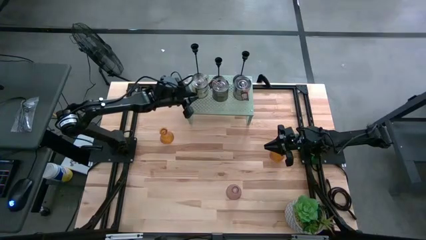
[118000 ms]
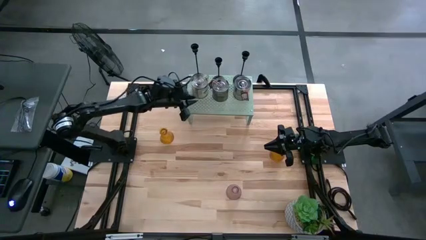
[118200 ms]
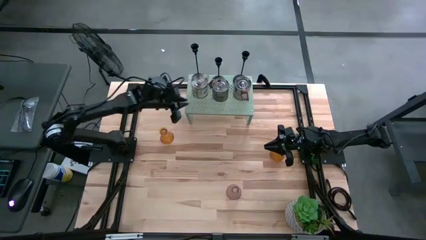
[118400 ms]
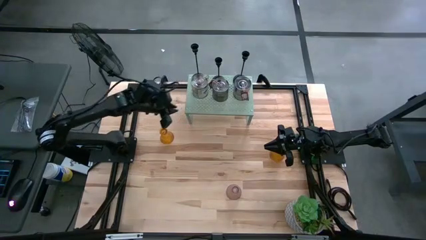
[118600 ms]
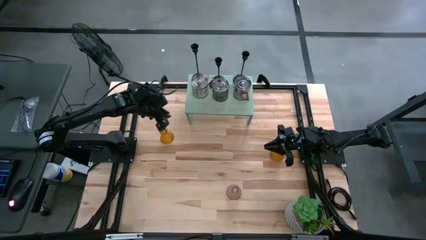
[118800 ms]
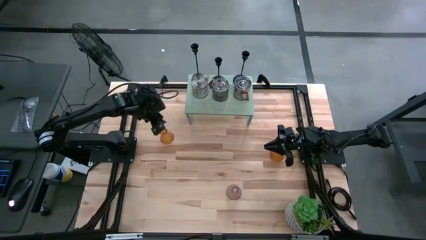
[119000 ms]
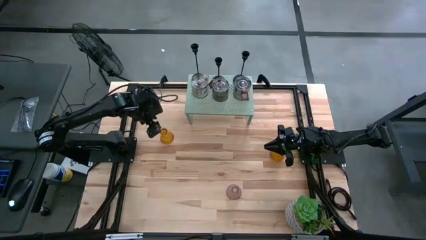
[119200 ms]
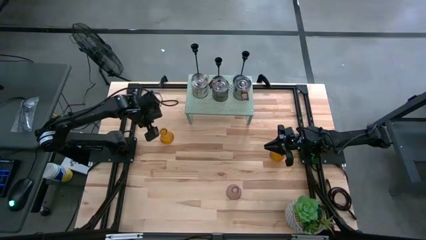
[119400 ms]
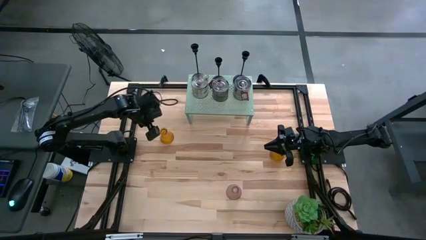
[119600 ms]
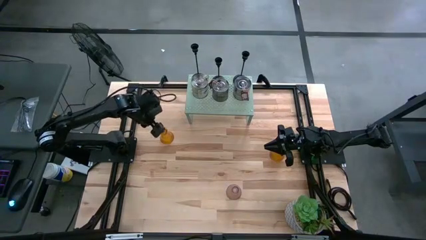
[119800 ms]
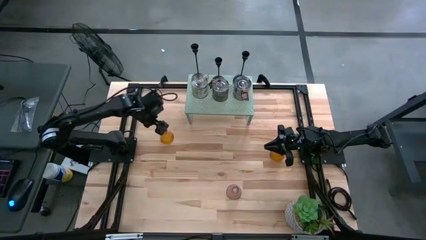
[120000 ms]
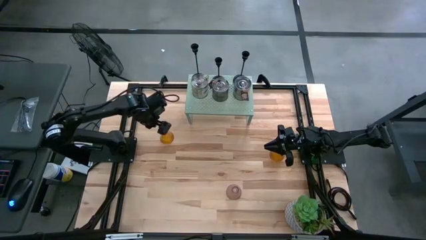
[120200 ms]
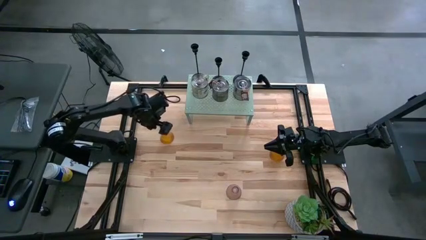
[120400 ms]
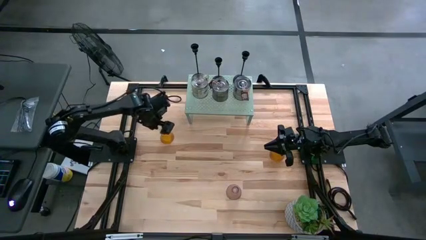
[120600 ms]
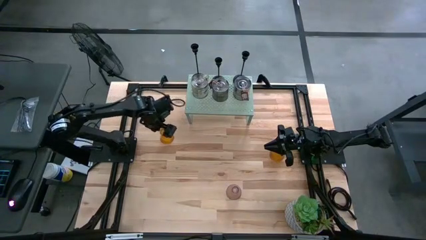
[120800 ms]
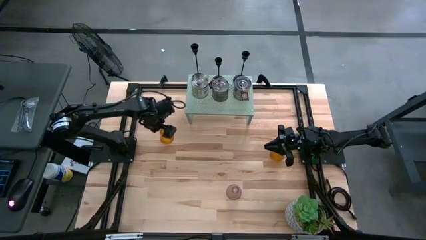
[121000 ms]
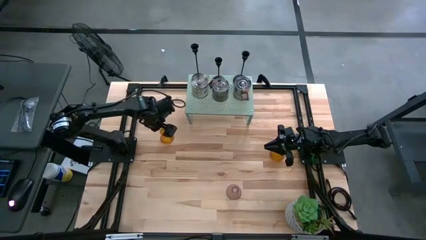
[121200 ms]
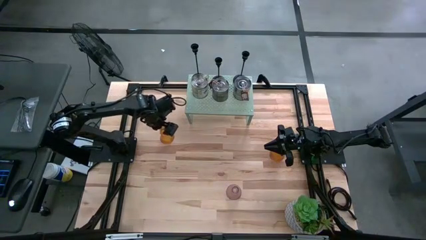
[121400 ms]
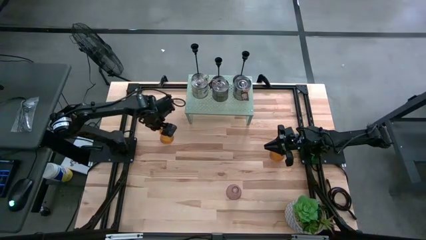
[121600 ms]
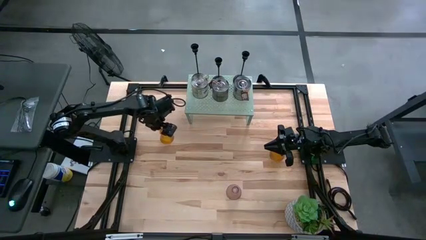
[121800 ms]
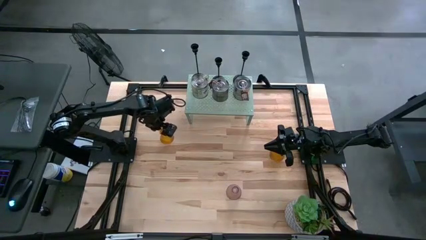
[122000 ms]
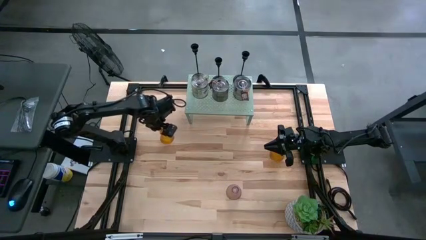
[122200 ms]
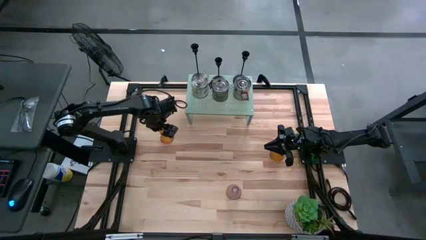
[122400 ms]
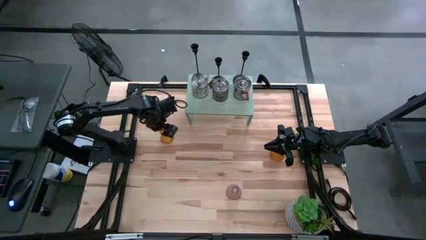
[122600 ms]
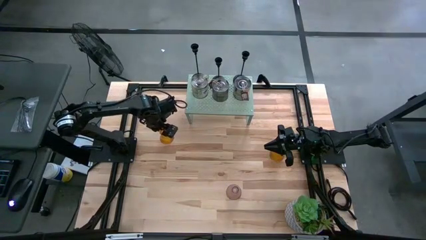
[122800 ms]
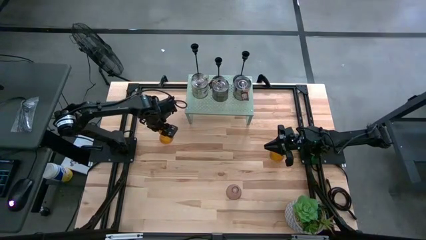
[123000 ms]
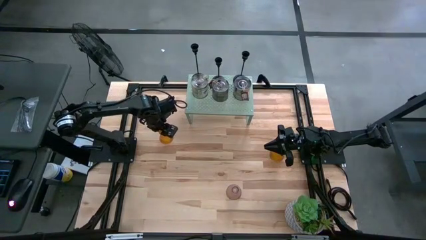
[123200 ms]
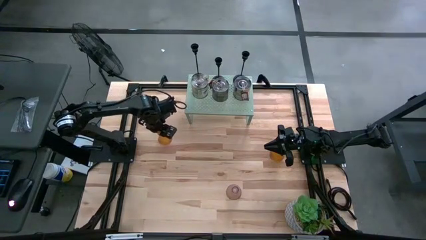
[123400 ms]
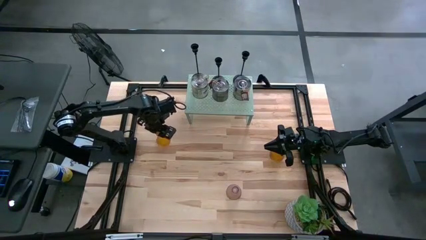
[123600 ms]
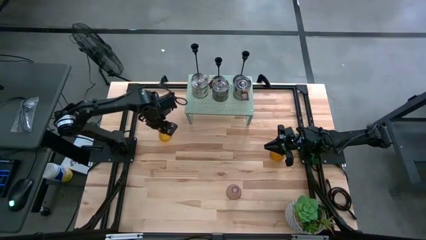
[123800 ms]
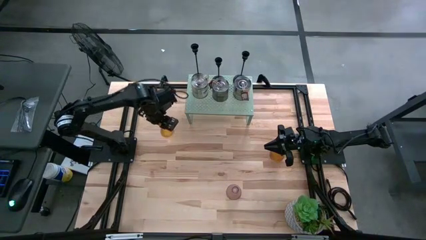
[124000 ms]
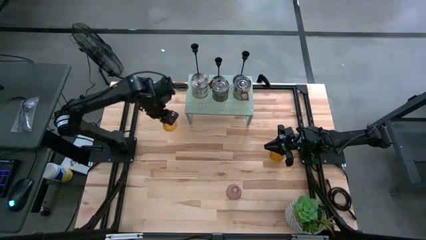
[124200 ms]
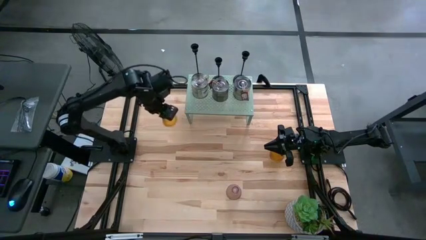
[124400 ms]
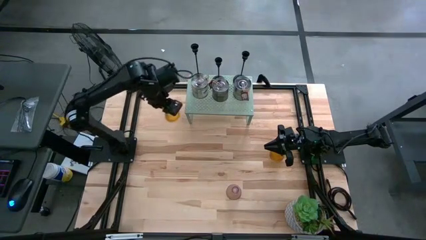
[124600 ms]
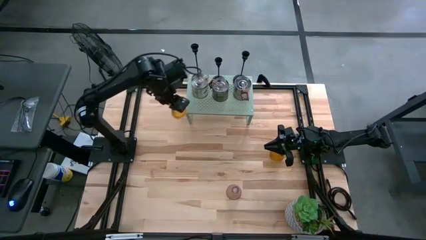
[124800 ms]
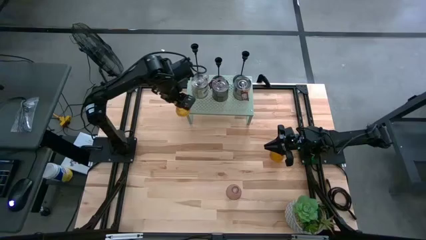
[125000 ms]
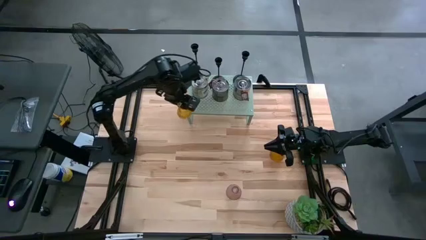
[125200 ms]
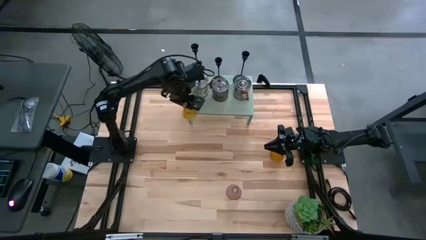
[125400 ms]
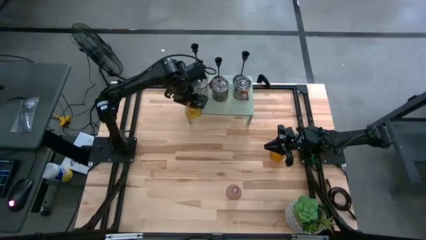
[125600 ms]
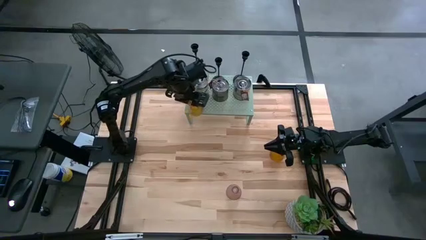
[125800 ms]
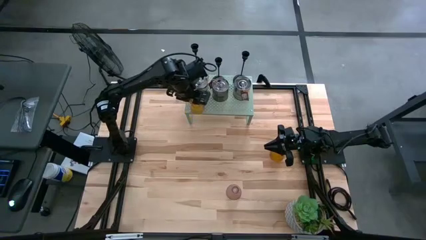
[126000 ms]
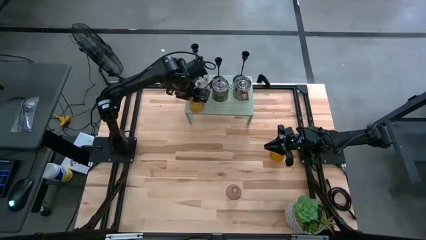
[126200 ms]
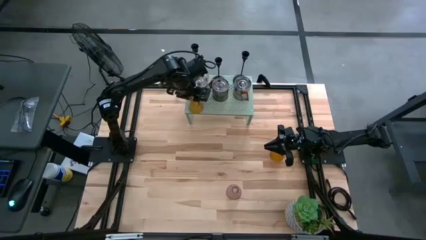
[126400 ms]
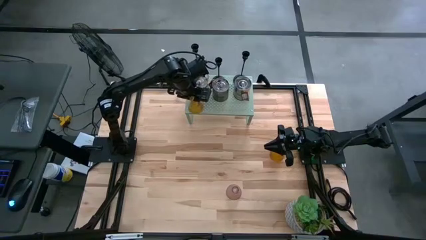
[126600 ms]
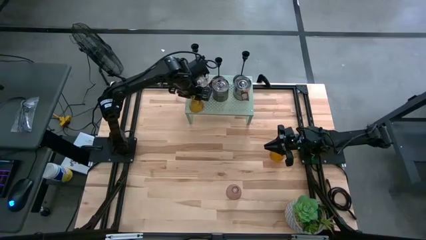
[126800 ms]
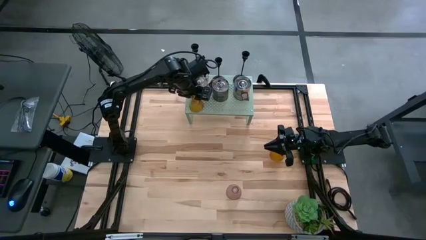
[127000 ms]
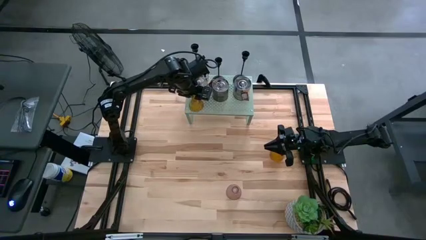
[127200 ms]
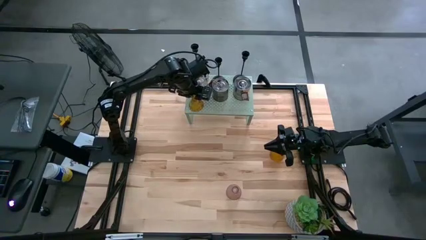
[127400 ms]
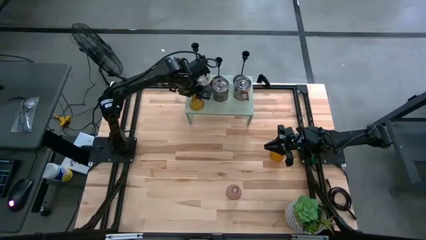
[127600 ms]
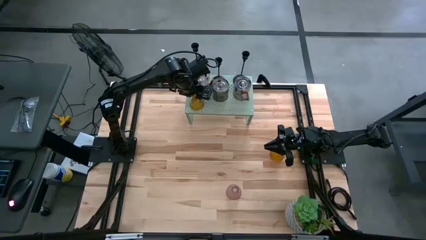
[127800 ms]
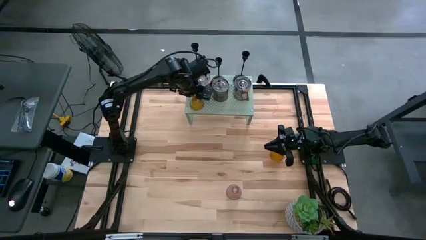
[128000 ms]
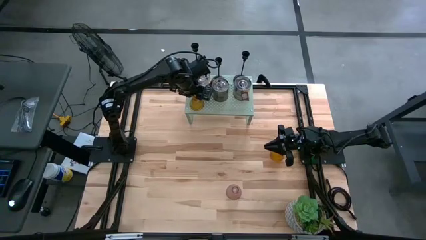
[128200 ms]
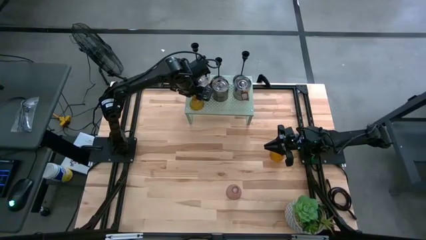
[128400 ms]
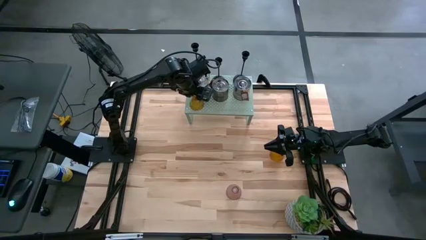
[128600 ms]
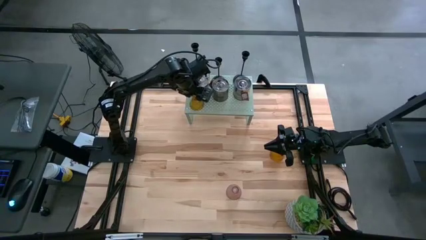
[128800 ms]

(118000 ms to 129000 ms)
Task: Pick & Place candle stick holders
Put the left orange glass candle holder on the shelf

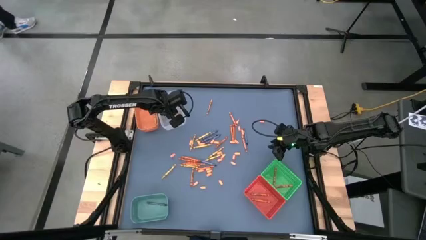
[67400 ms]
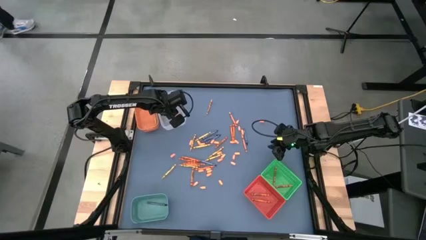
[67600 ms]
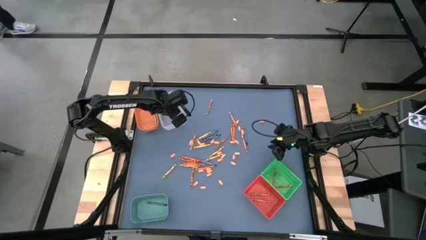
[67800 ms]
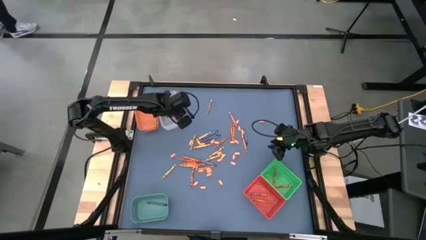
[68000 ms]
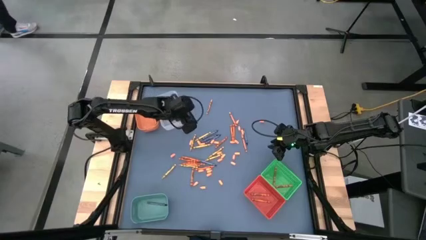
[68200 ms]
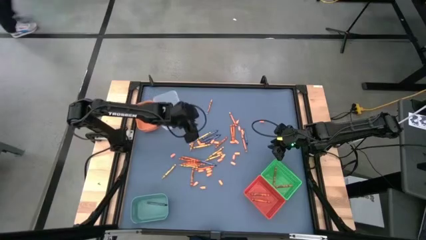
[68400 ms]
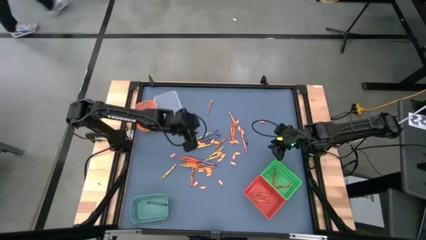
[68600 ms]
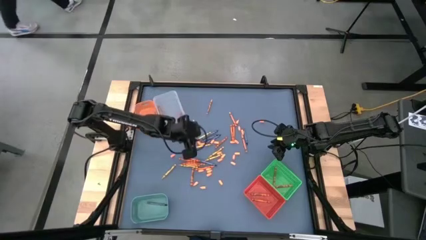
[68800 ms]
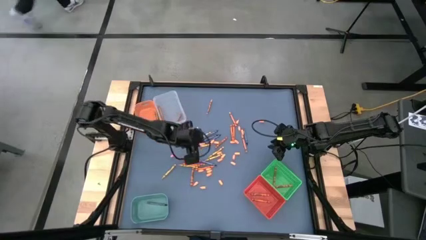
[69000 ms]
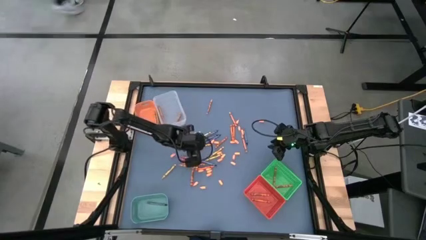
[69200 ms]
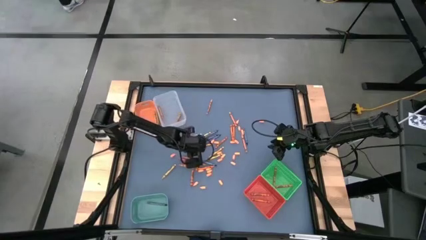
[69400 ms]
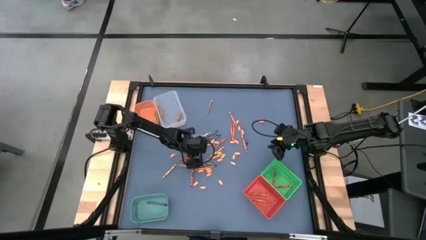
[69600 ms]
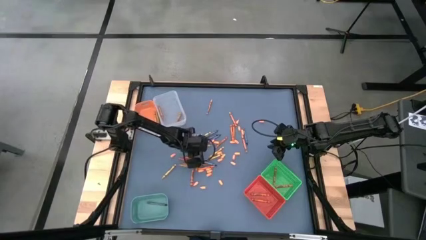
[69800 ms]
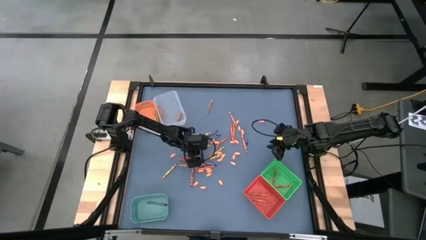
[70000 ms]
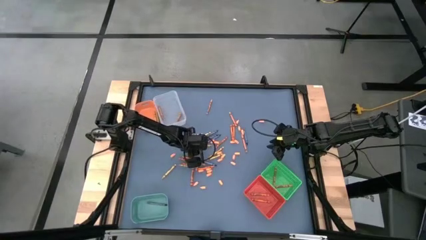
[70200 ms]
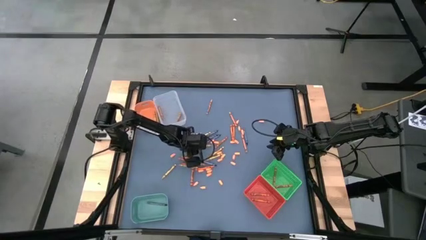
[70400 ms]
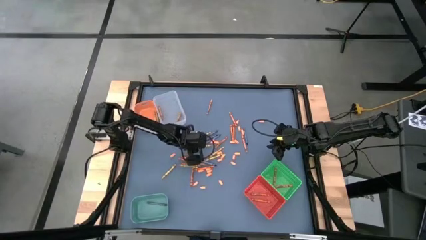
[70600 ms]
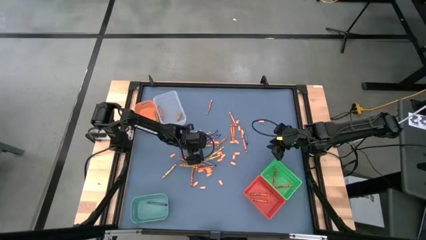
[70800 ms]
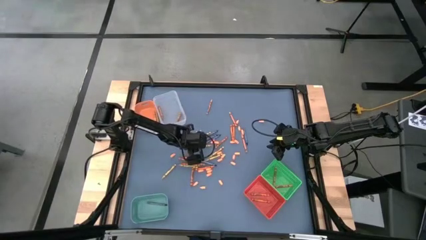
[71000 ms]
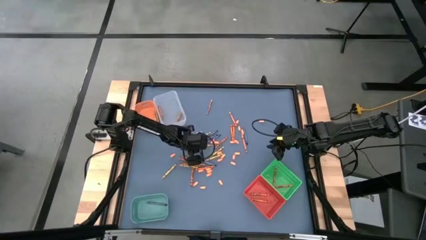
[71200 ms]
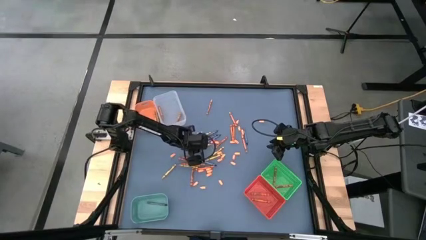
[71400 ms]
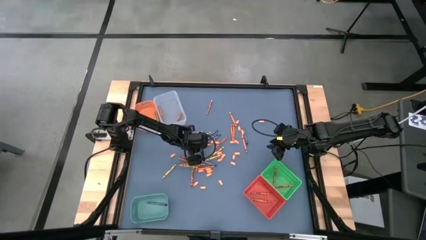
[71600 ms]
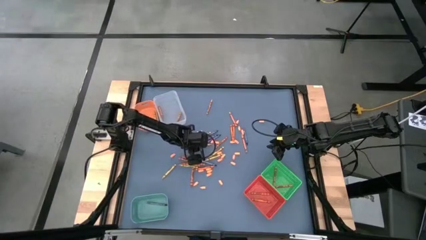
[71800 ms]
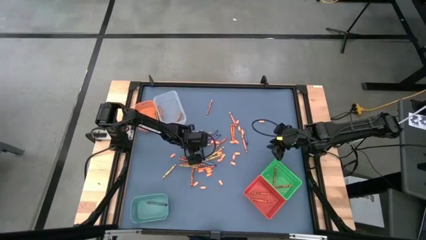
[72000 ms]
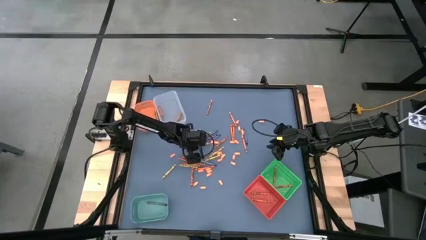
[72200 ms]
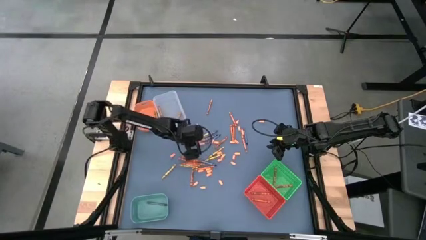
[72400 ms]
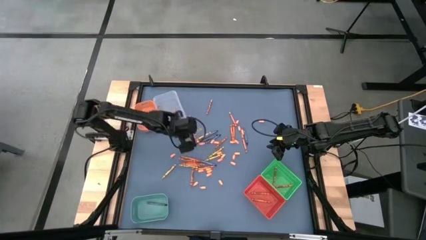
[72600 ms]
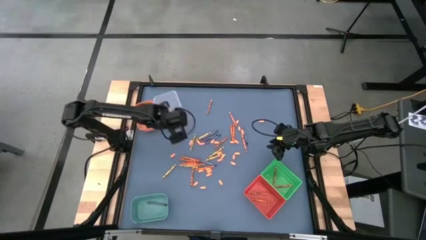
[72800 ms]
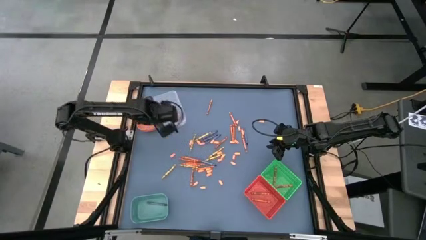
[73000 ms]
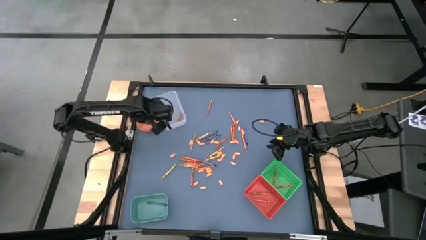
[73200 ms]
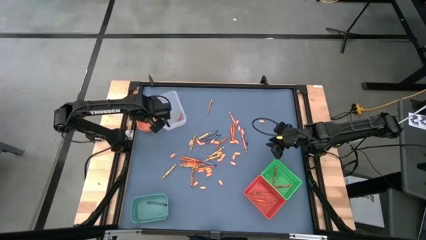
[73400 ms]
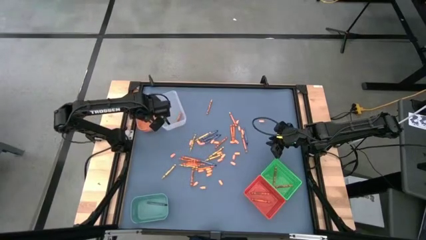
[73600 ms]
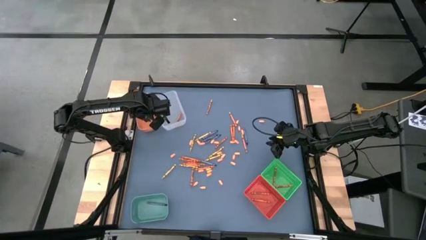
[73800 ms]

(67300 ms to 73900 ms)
Task: Sort crayons
Put the yellow crayon into the orange bin

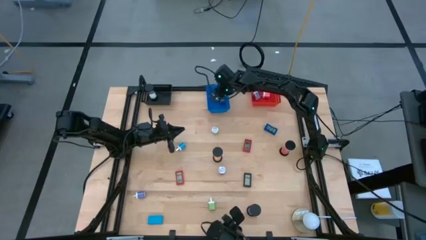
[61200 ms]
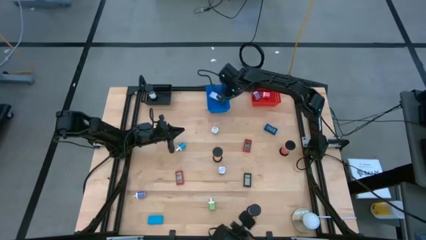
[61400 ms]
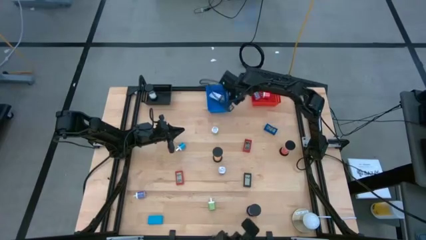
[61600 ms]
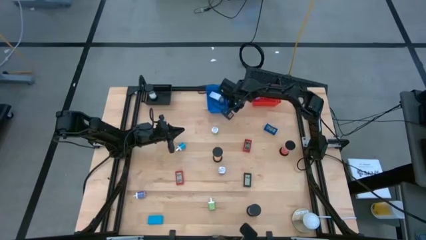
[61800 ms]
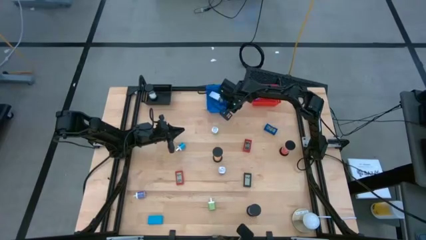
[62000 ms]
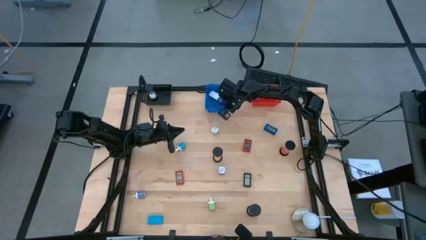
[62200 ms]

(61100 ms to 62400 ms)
Task: Pick & Place Office items
Adjust the blue basket
